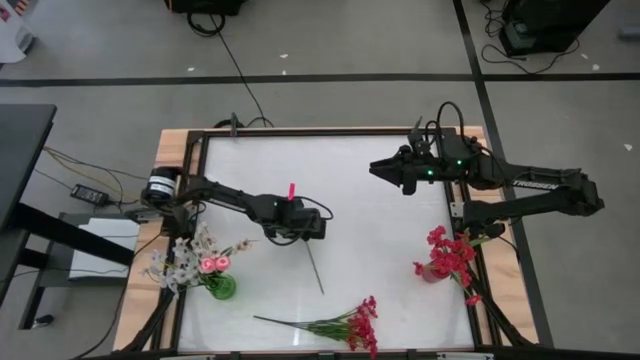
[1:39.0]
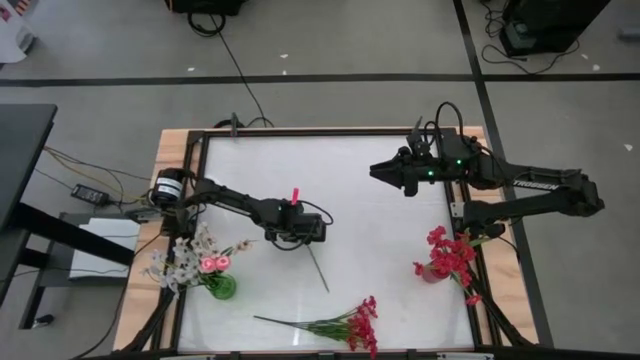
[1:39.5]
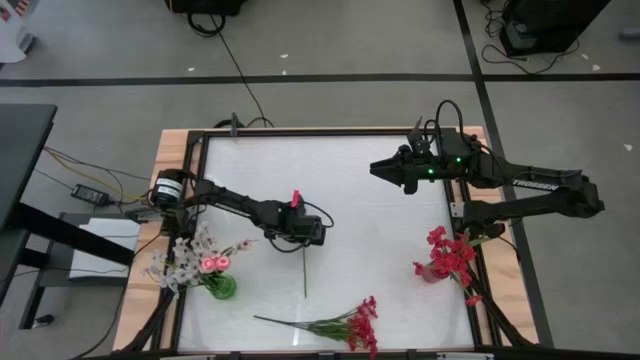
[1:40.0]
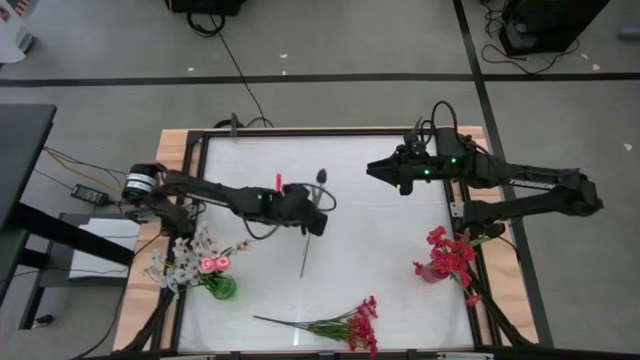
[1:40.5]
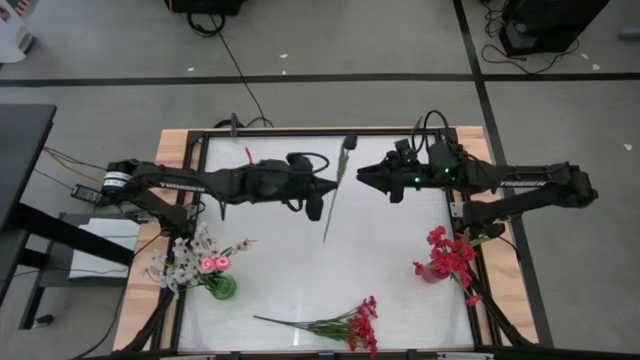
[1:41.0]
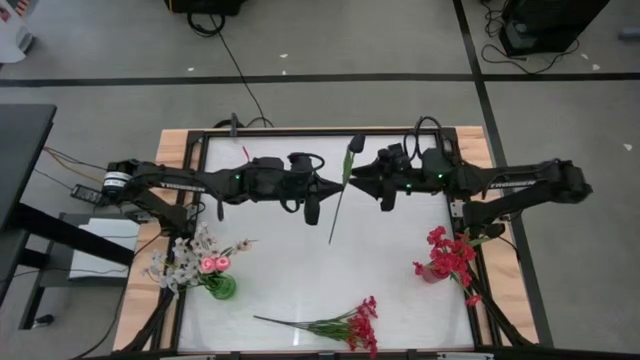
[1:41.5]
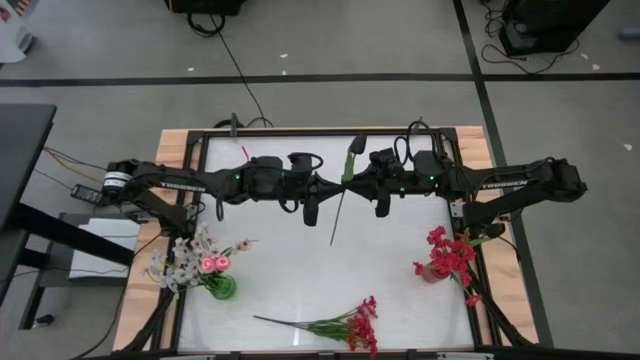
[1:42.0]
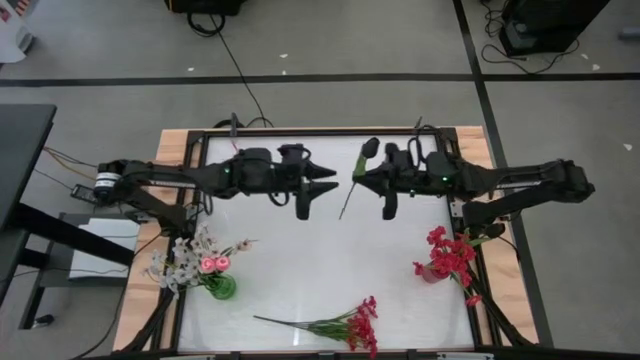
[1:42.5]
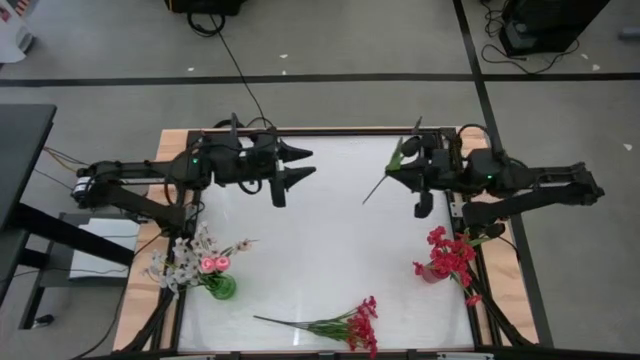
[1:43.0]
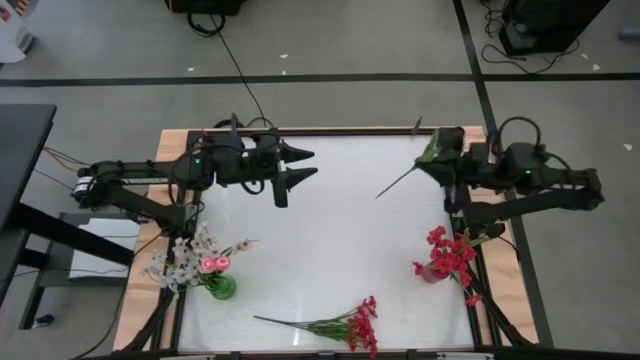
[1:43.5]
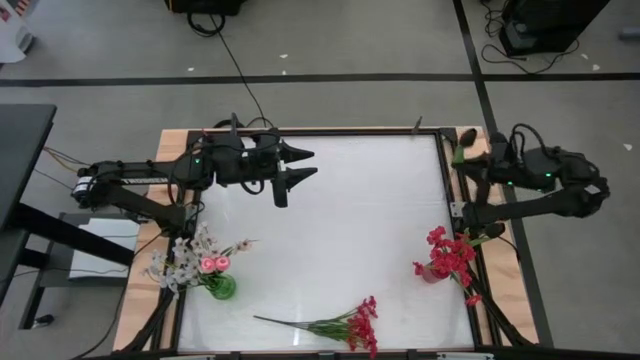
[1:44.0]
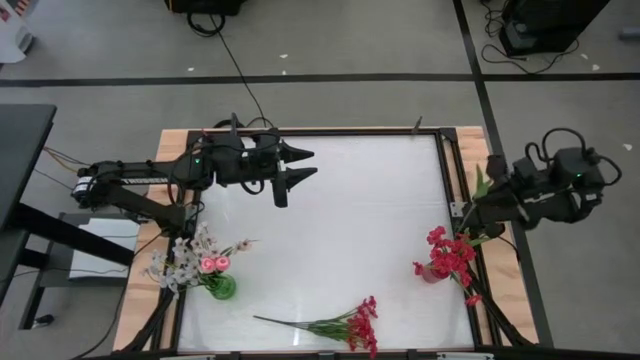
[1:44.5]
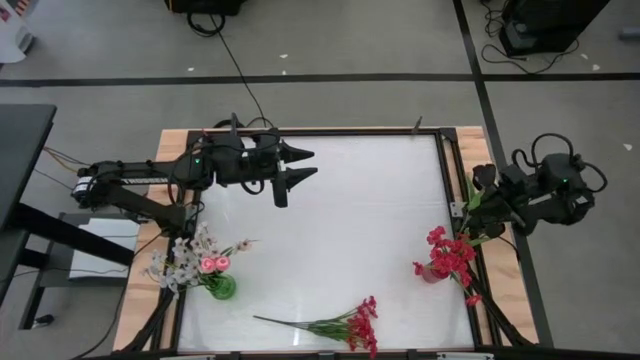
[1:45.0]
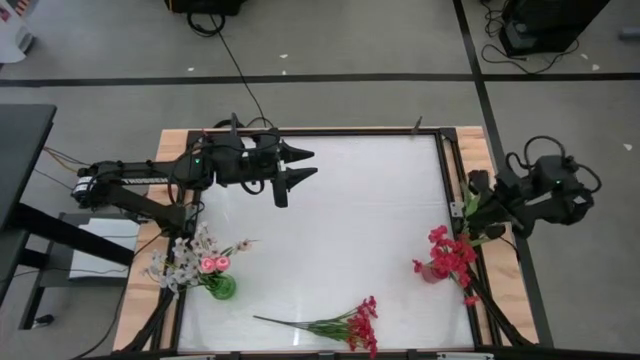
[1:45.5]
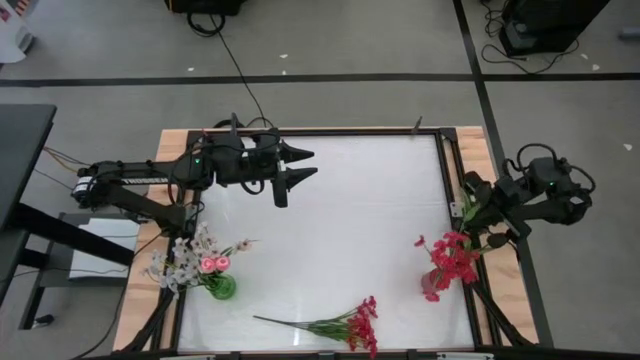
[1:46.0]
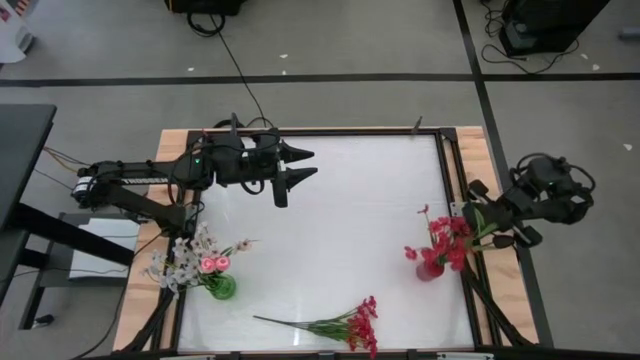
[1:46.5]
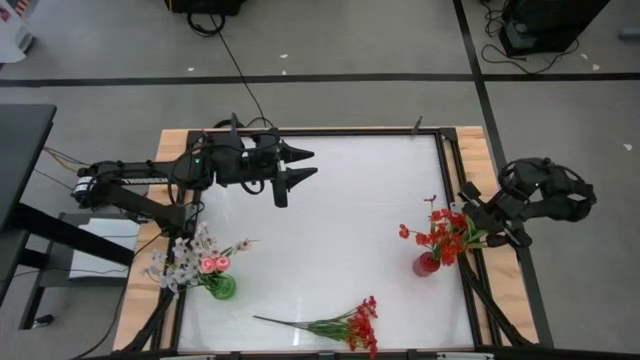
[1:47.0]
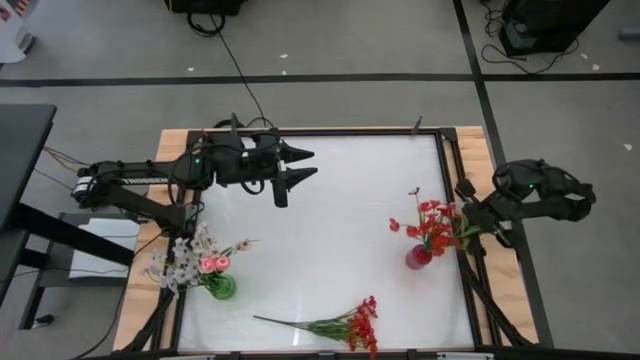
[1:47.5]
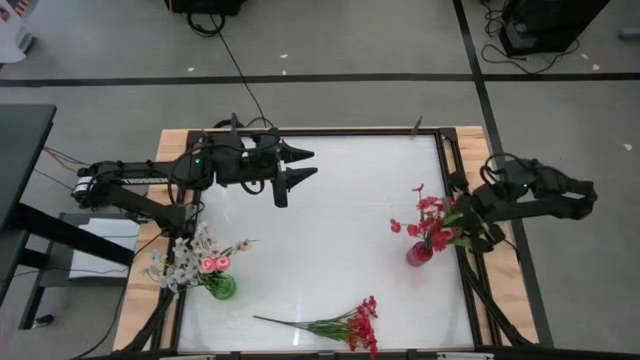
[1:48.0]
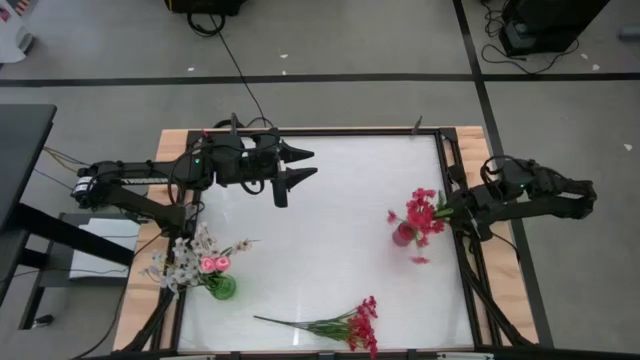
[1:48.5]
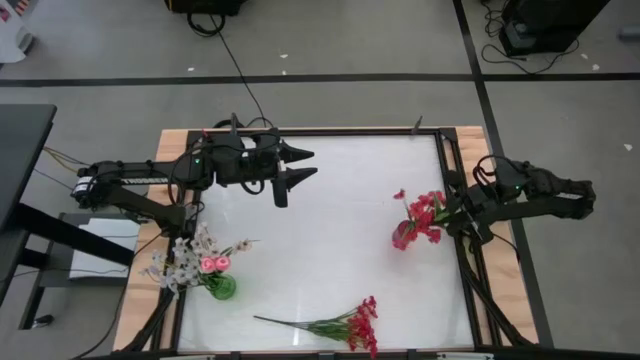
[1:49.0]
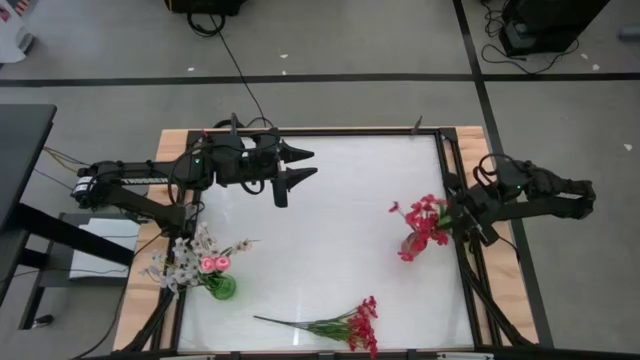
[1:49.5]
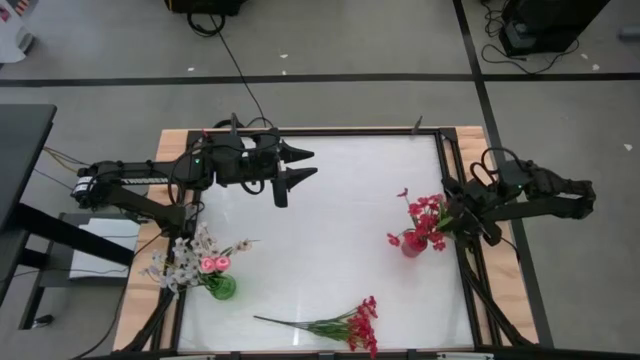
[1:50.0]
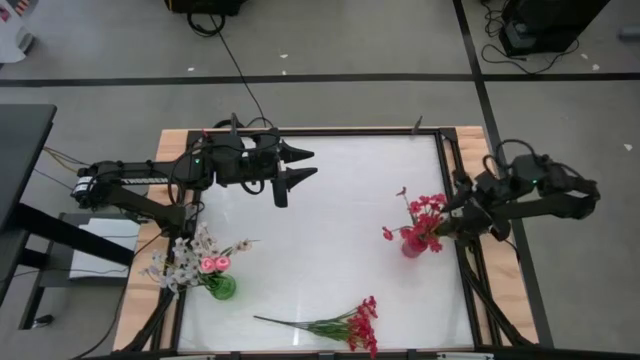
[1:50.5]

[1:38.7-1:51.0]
Task: Sort flowers into vase by color
Put the black flower into the red vase

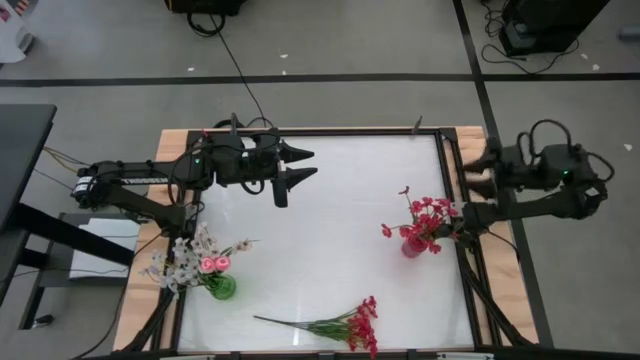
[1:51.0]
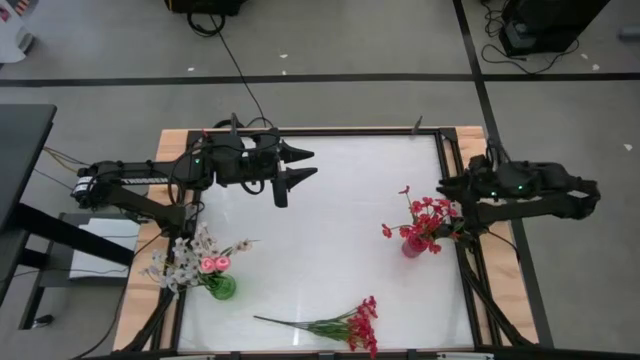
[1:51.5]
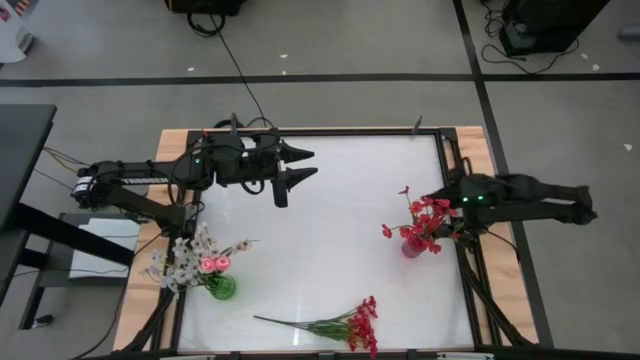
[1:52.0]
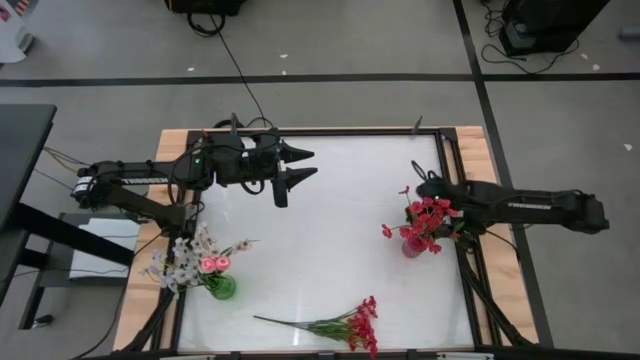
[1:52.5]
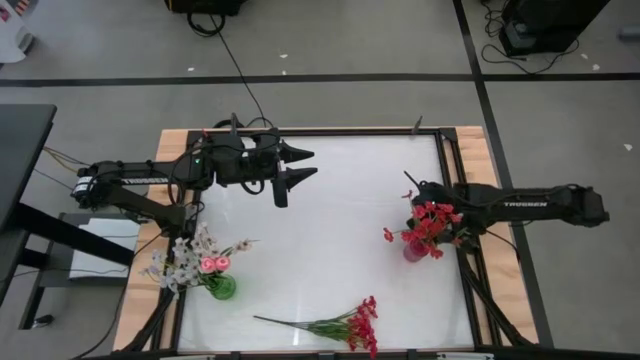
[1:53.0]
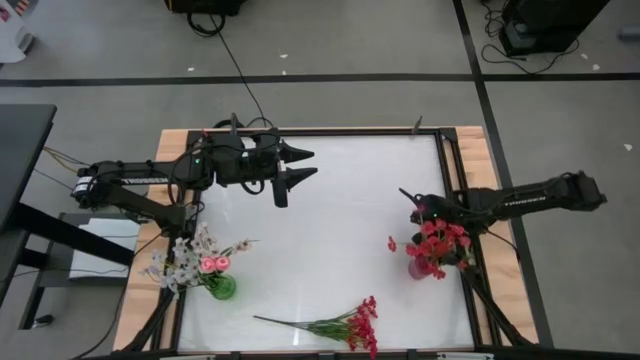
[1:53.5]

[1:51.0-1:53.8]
Adjust the red vase

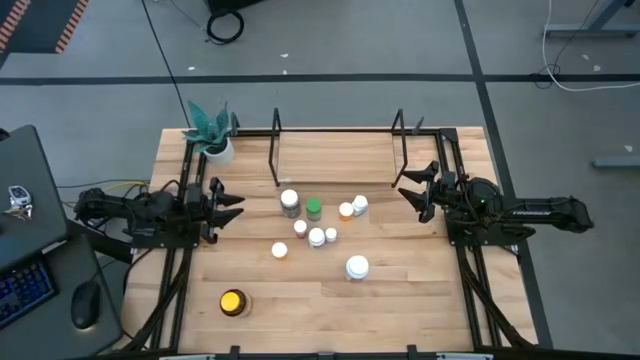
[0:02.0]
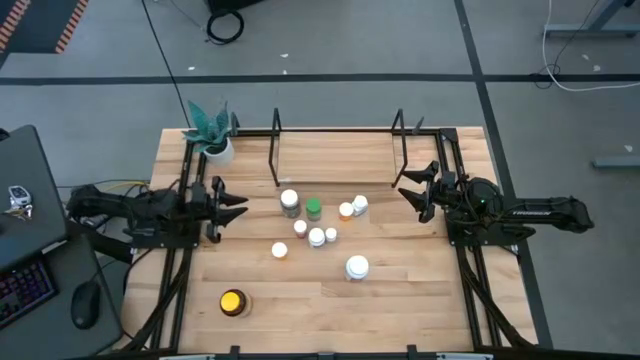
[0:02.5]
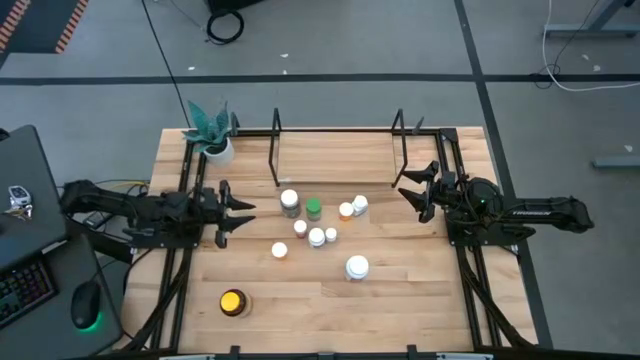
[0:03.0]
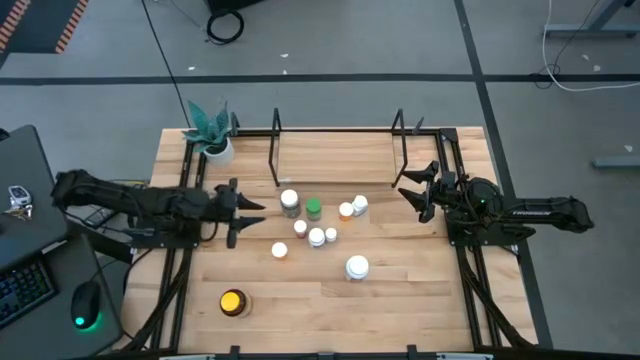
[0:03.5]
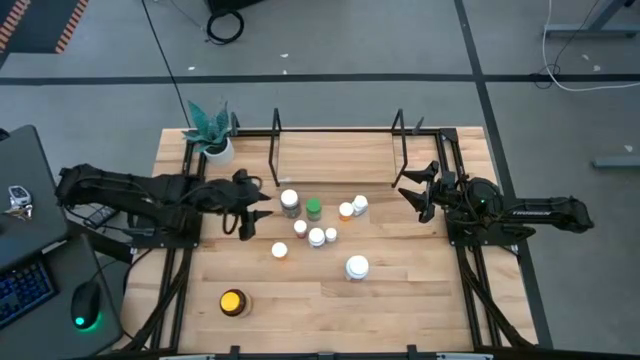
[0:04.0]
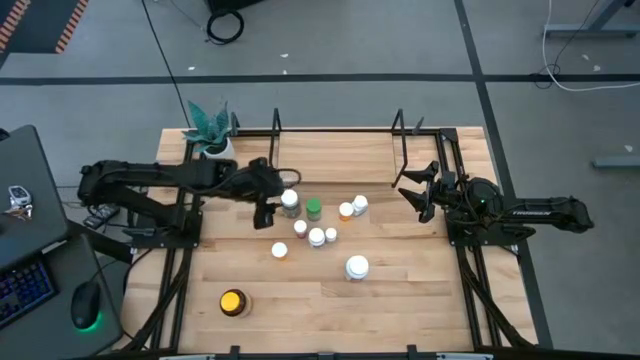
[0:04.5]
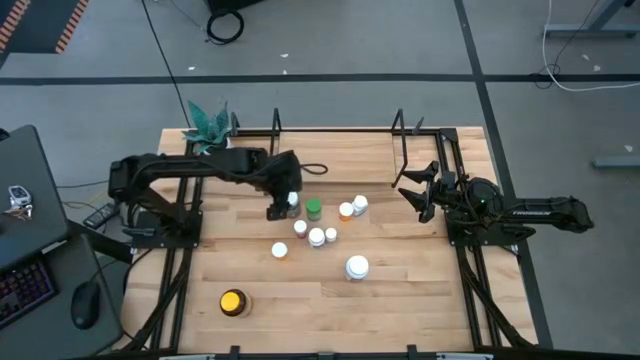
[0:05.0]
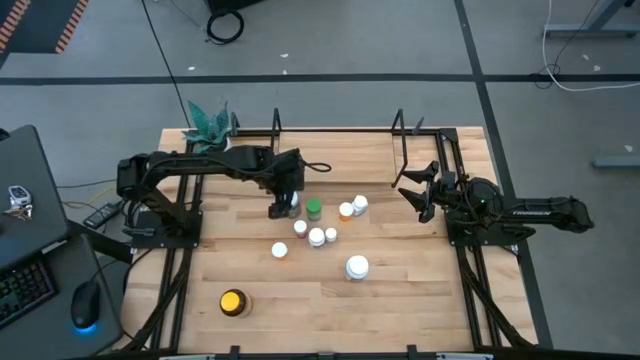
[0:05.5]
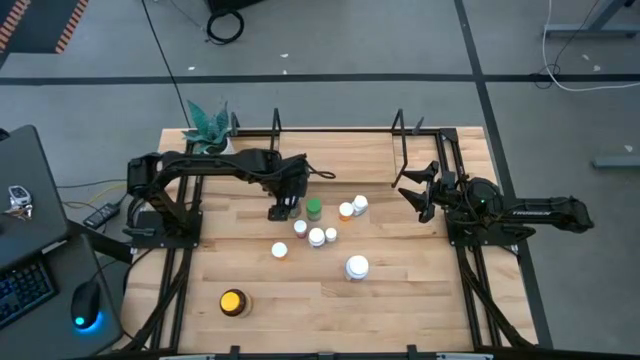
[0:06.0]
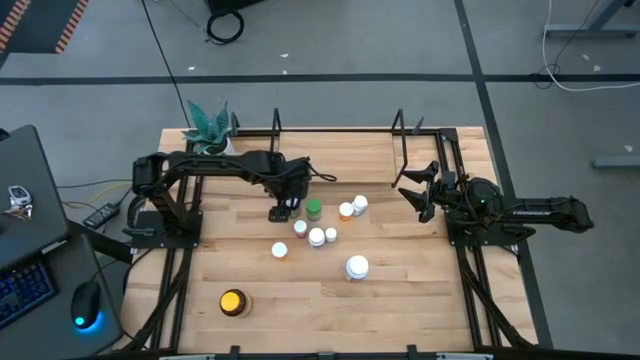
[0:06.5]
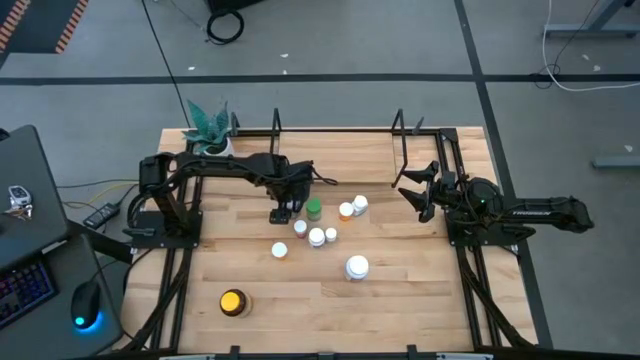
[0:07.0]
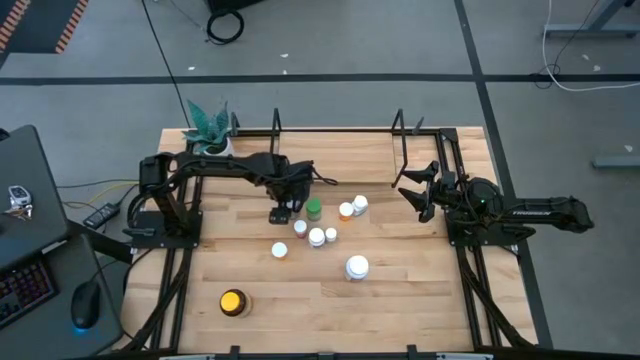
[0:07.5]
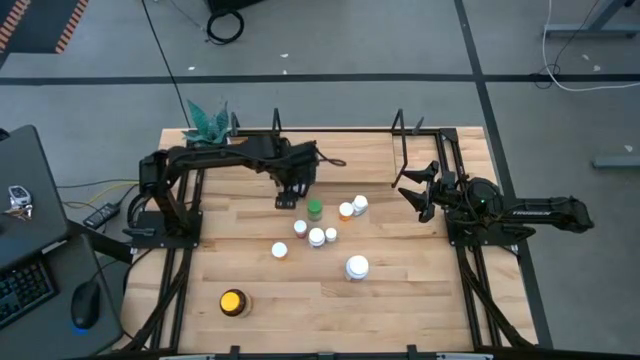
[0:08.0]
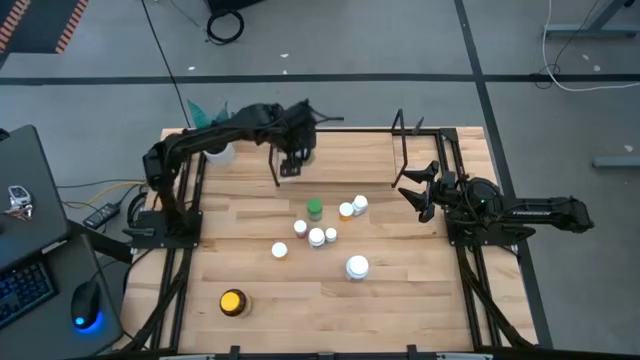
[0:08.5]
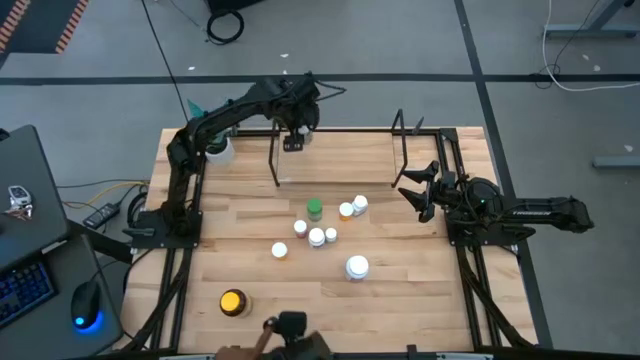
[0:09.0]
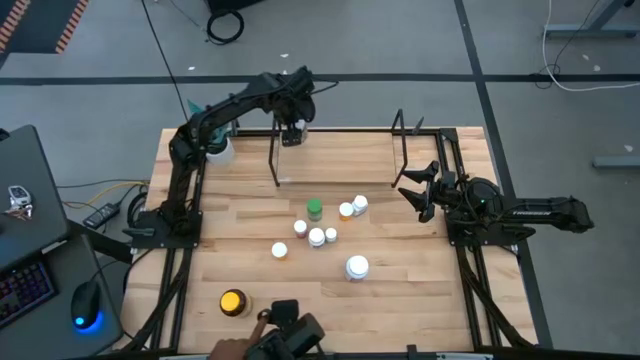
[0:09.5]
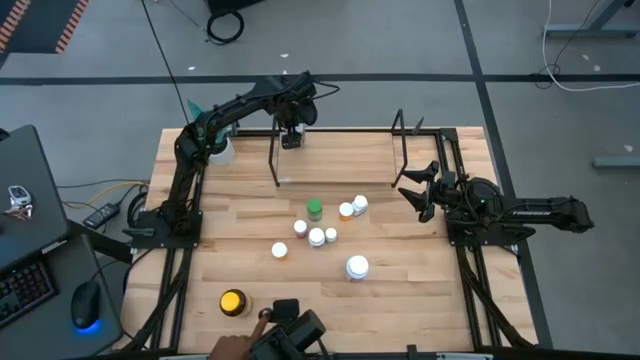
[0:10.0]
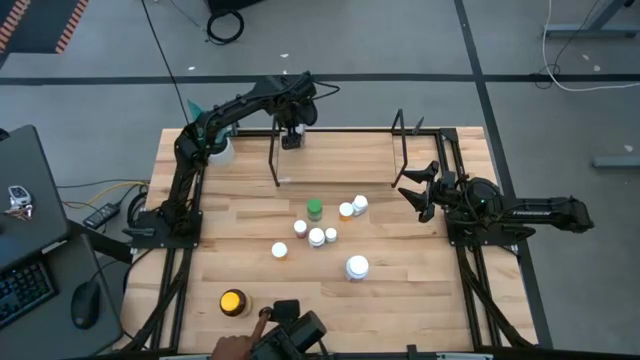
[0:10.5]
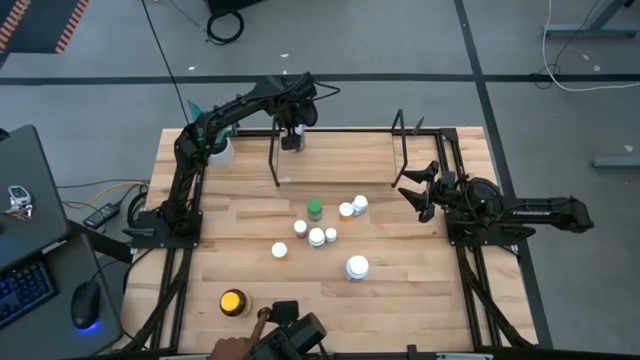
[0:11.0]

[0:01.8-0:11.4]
Task: Pick and place medicine bottles onto shelf by color
Put the large white and green medicine bottle on the shelf
